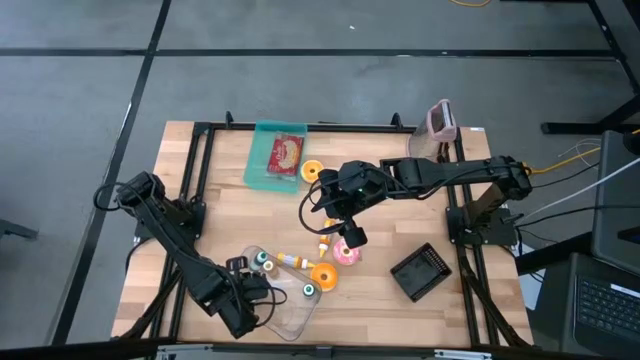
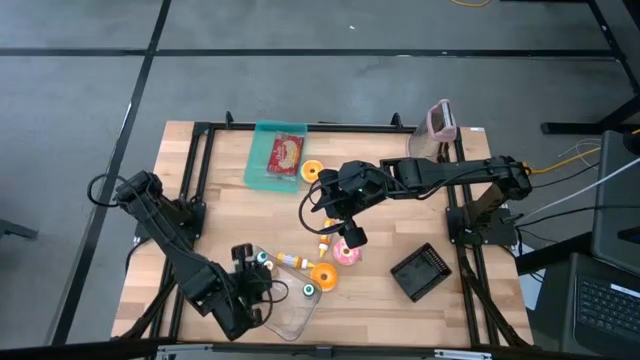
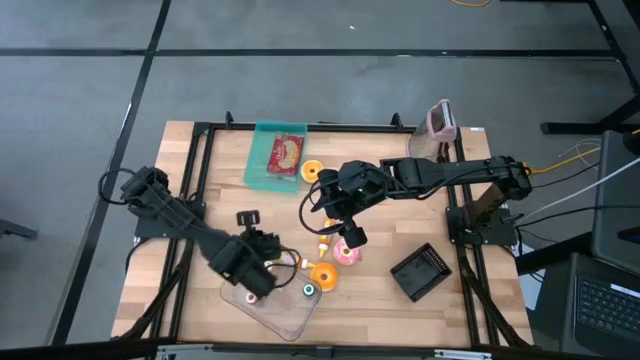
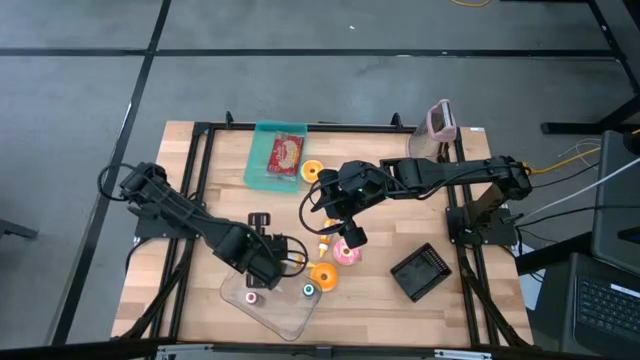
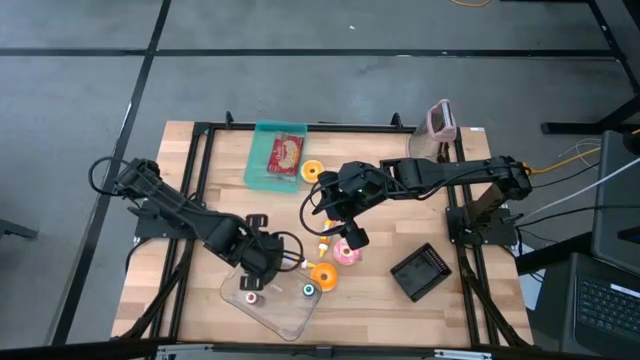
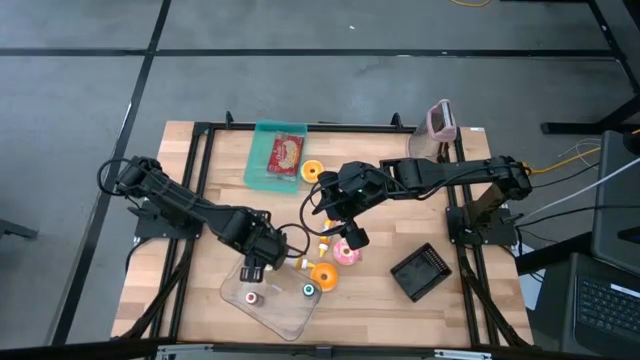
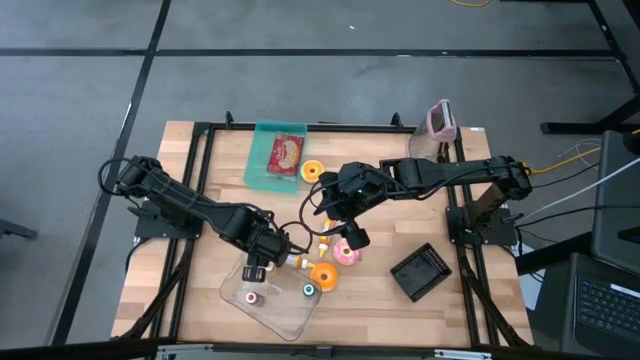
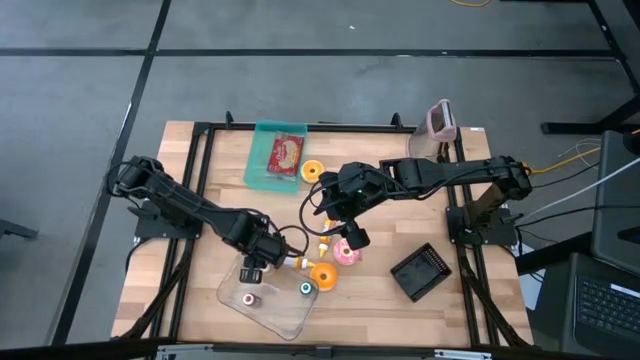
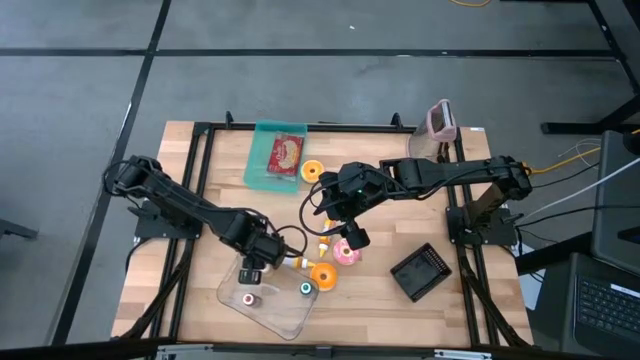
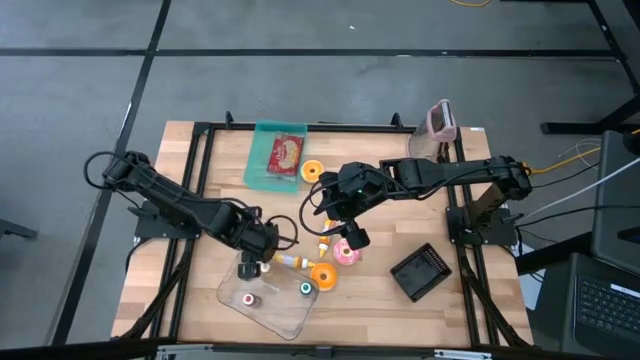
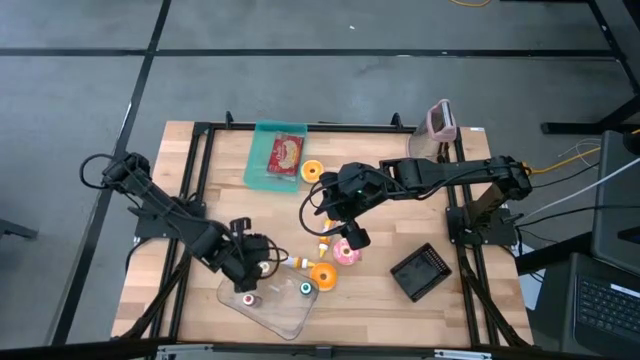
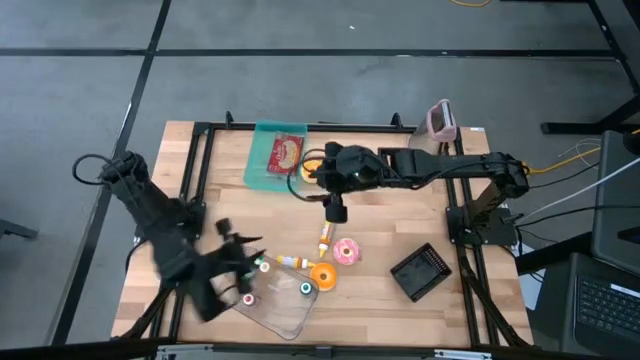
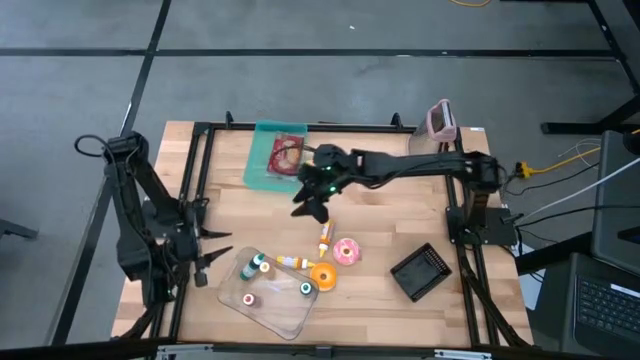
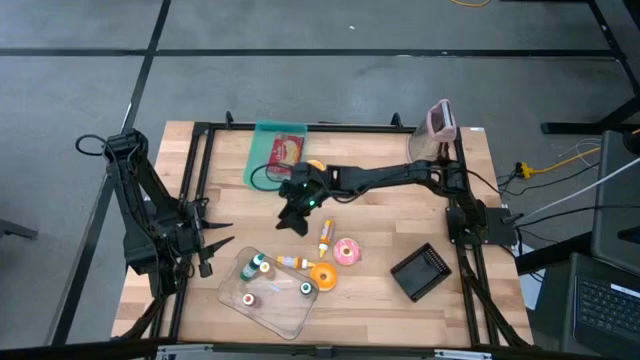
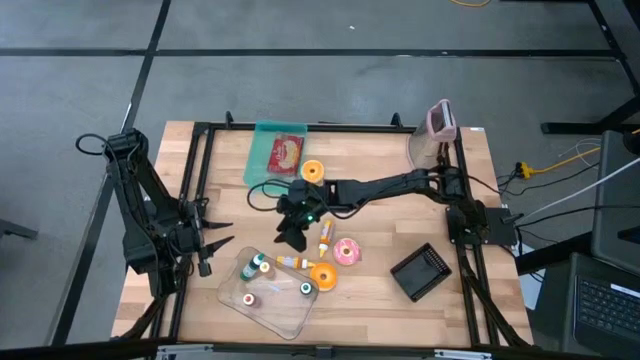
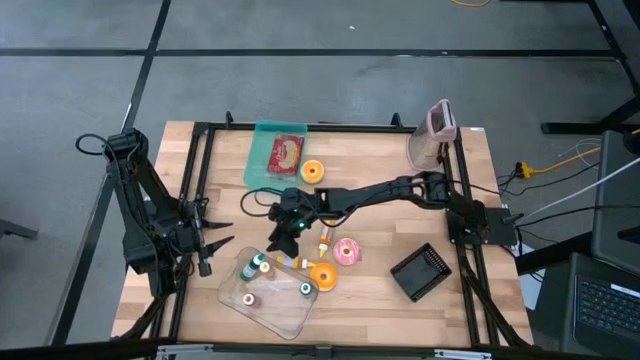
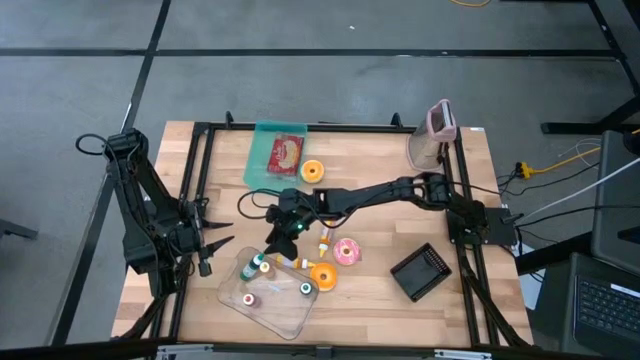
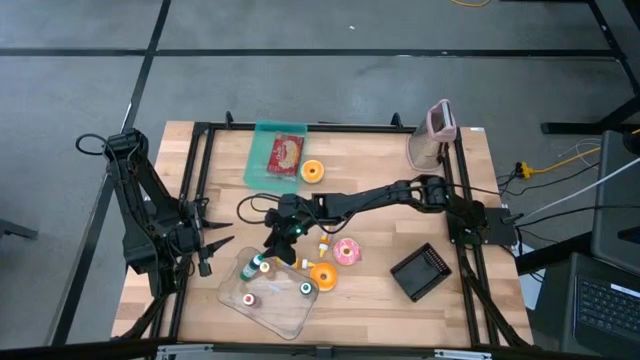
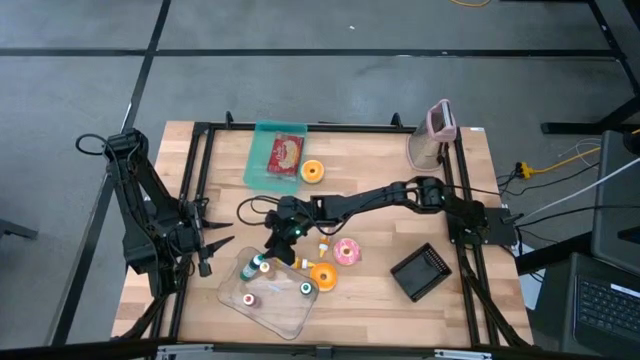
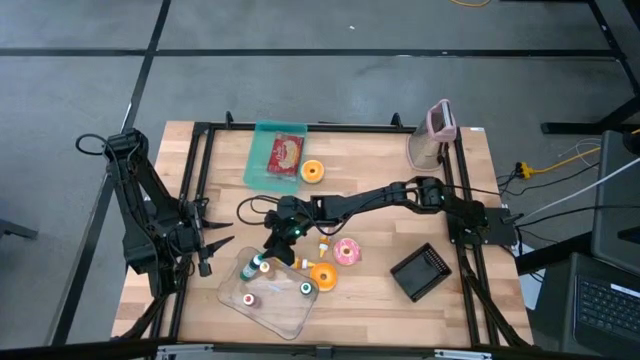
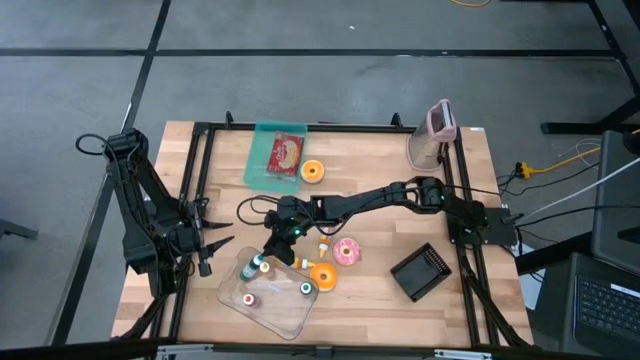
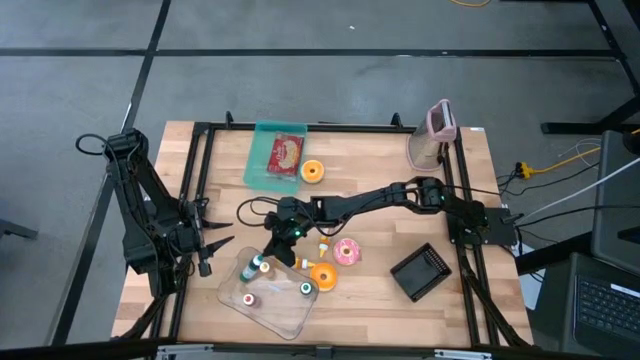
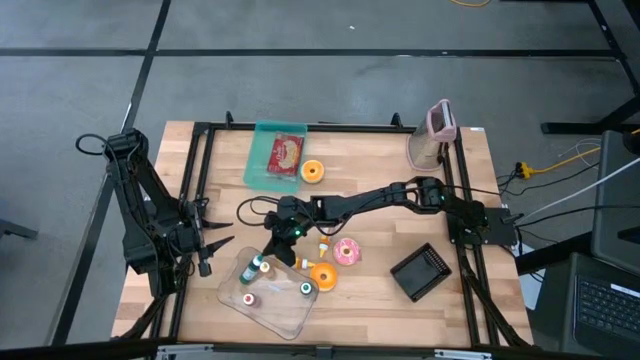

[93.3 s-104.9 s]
Adjust the left green food coloring bottle in the transparent bin

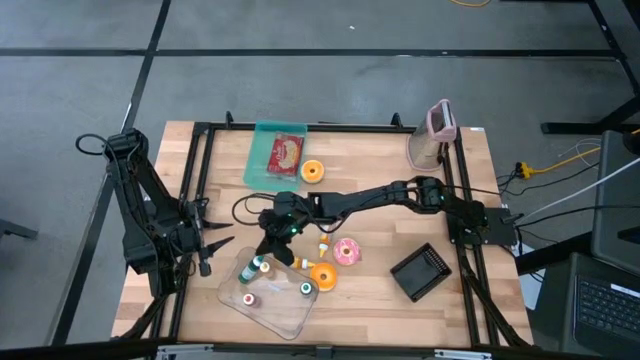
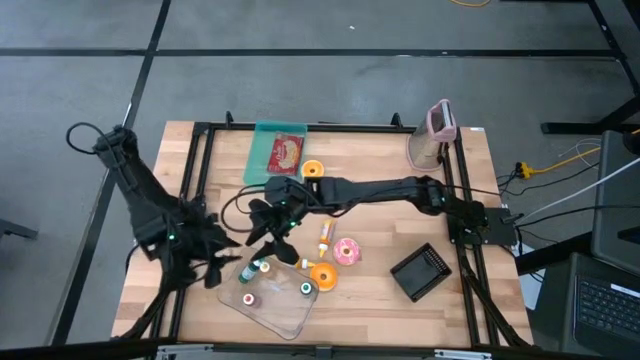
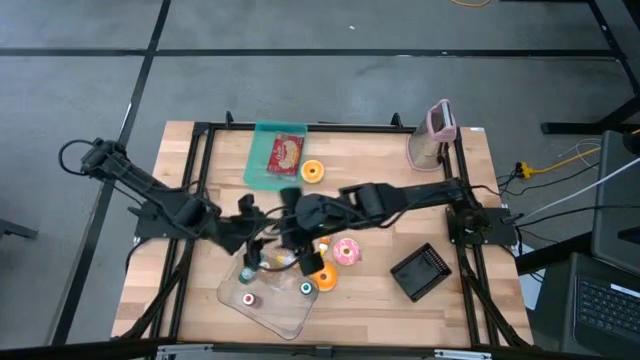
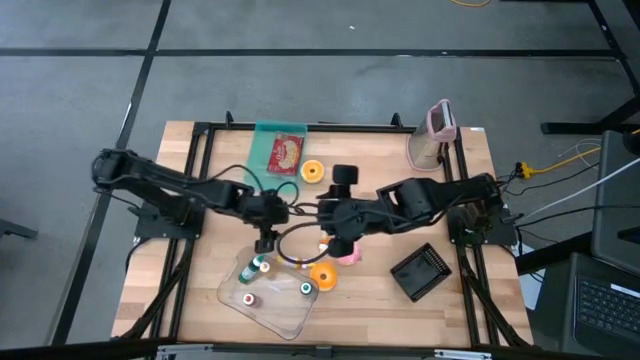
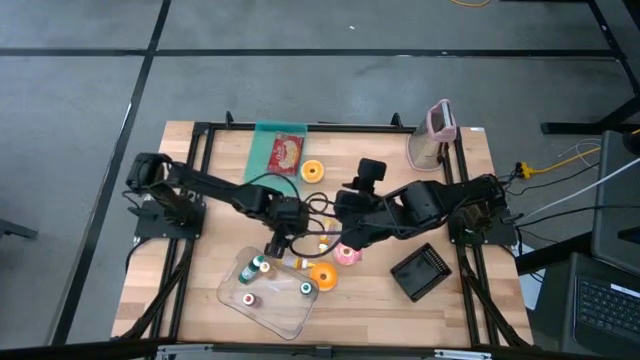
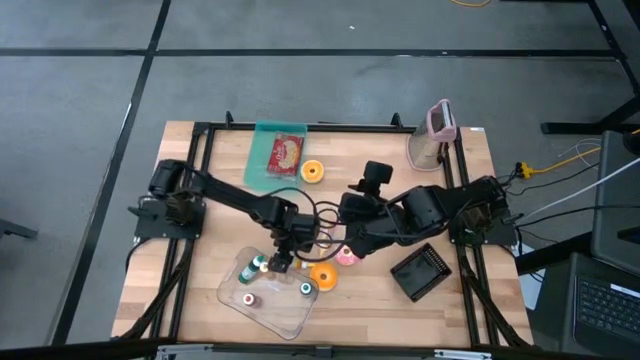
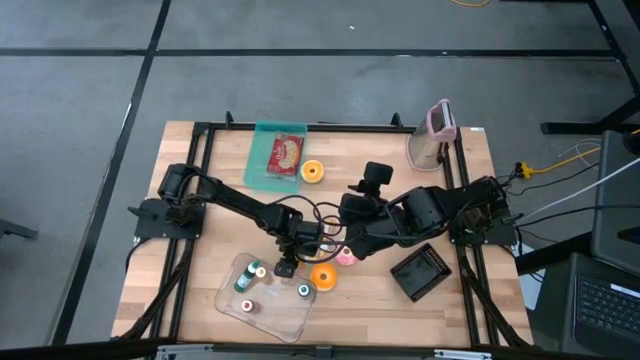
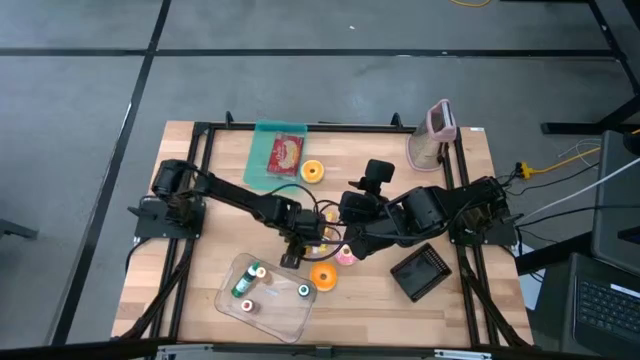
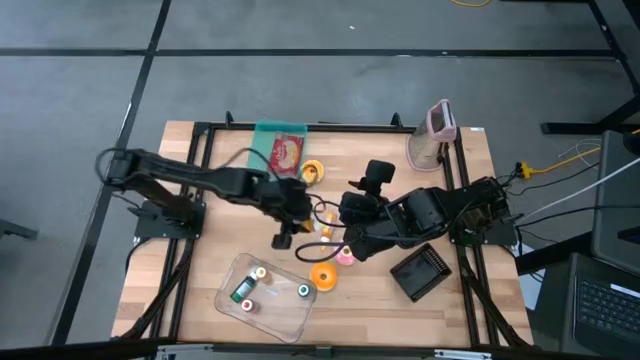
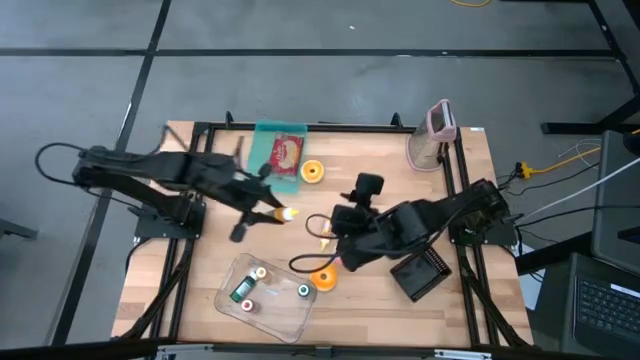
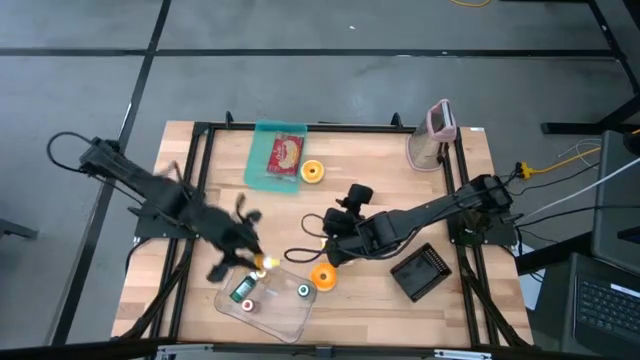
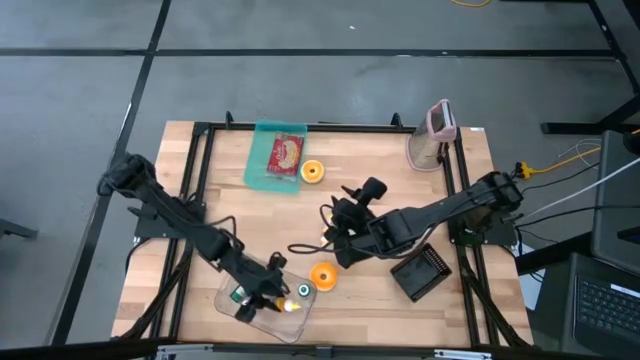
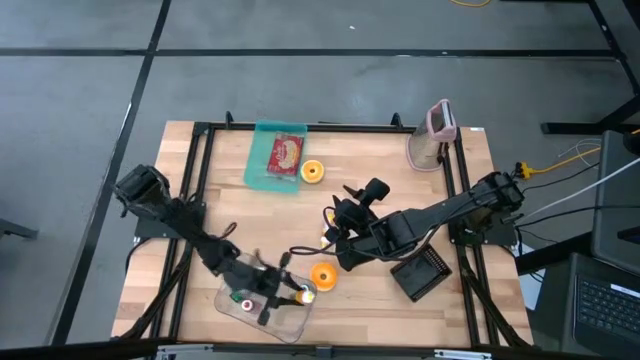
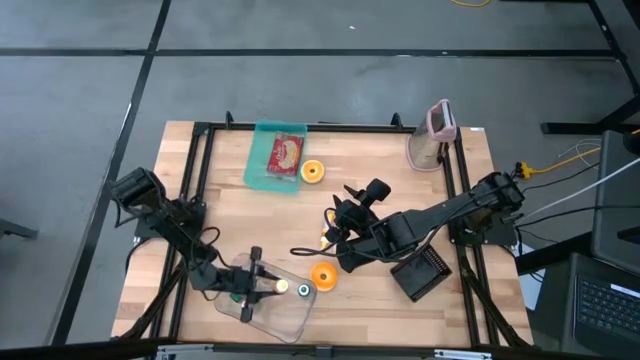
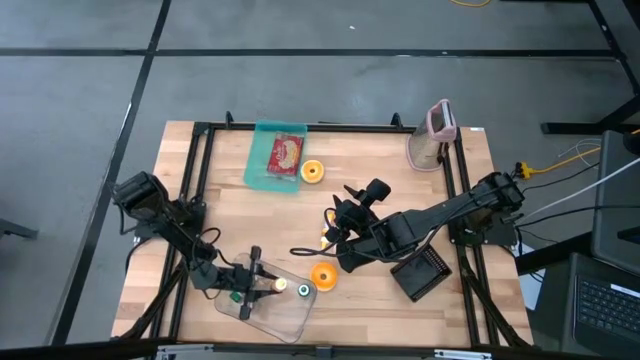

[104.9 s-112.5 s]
Put the bottom yellow food coloring bottle into the transparent bin
